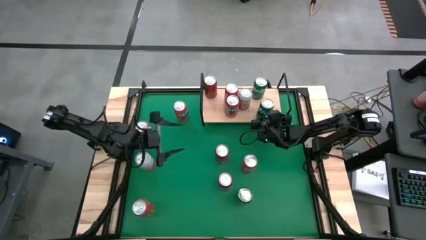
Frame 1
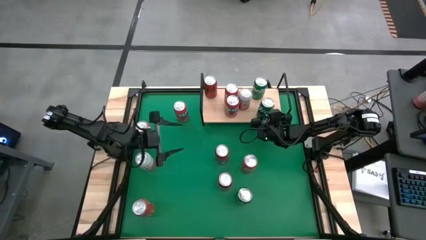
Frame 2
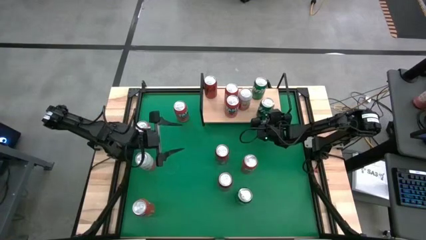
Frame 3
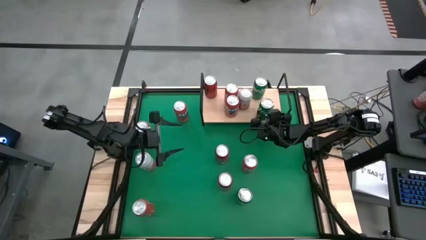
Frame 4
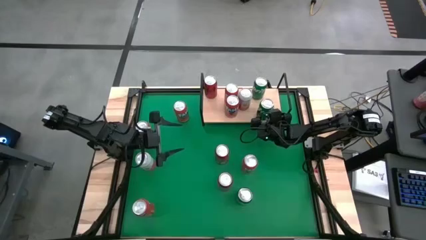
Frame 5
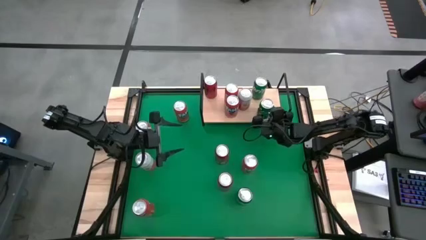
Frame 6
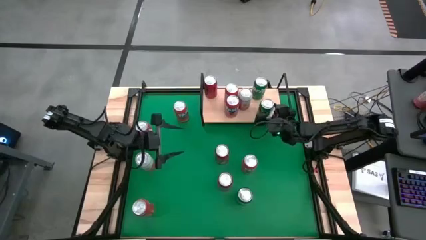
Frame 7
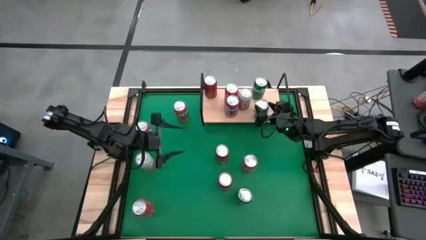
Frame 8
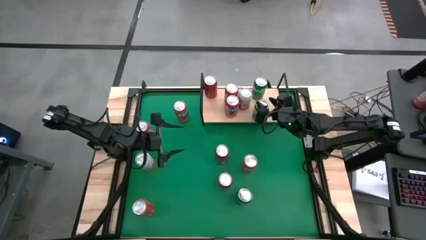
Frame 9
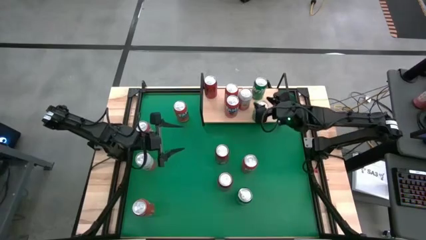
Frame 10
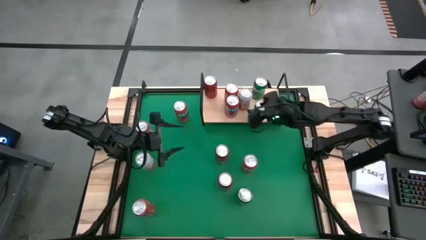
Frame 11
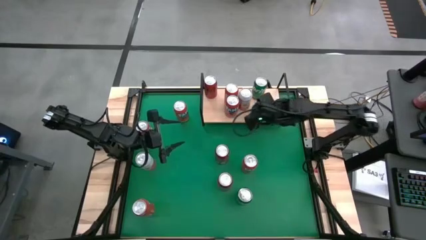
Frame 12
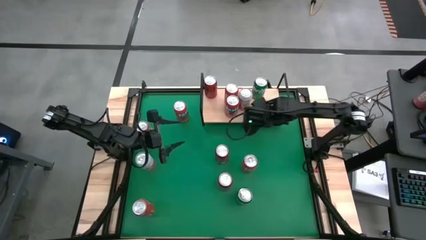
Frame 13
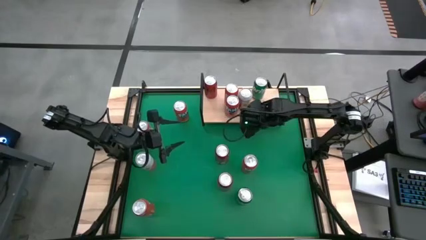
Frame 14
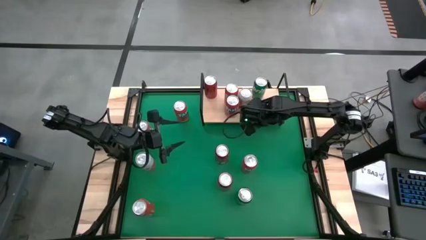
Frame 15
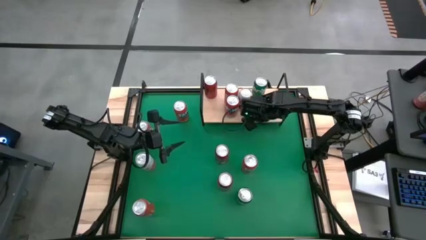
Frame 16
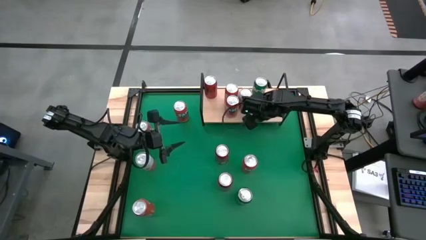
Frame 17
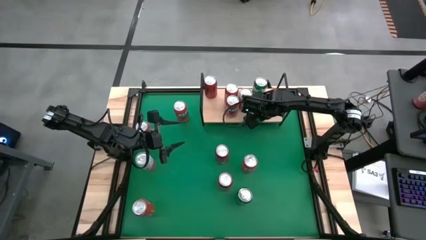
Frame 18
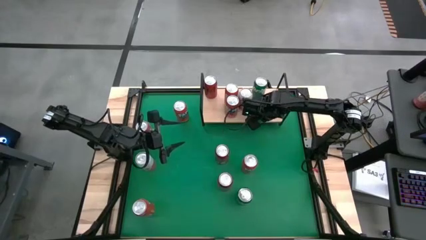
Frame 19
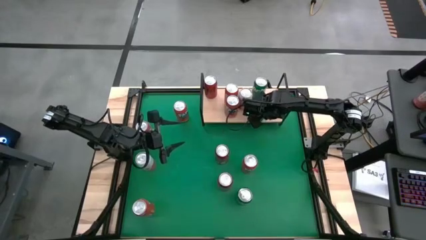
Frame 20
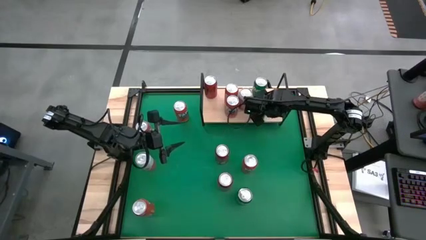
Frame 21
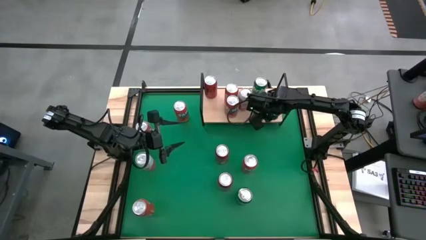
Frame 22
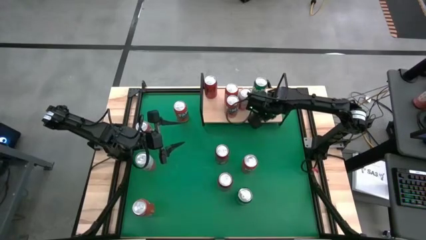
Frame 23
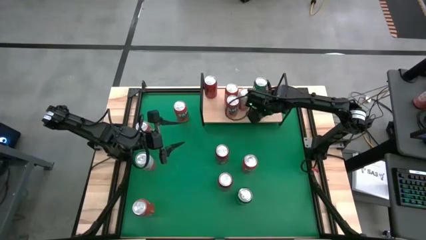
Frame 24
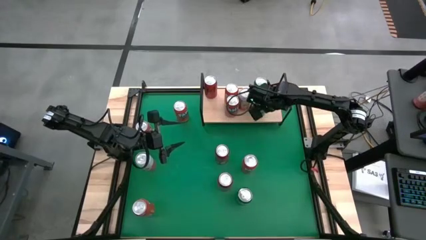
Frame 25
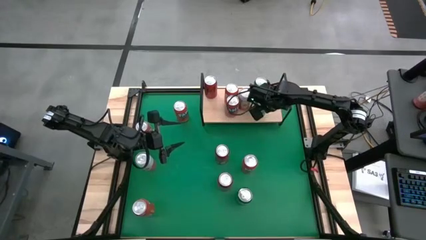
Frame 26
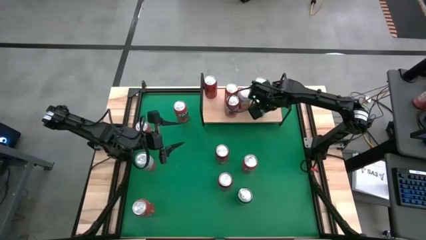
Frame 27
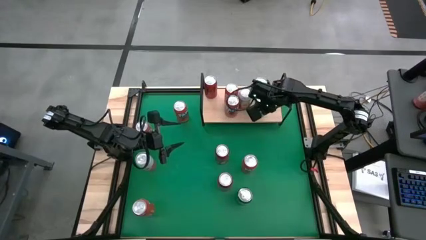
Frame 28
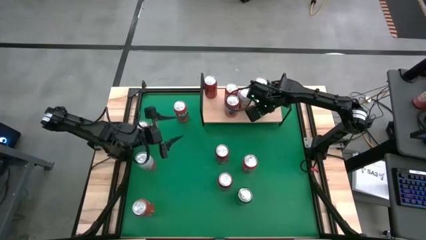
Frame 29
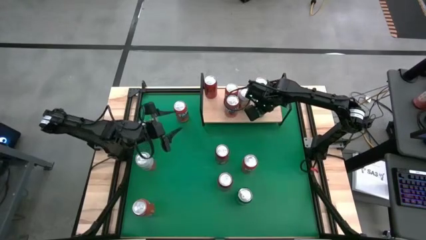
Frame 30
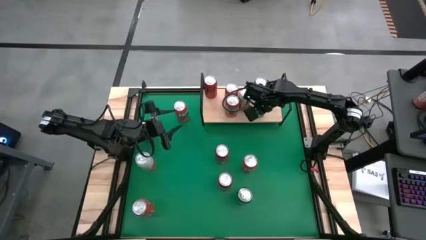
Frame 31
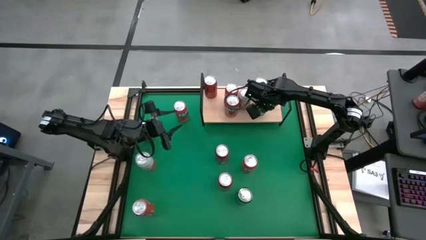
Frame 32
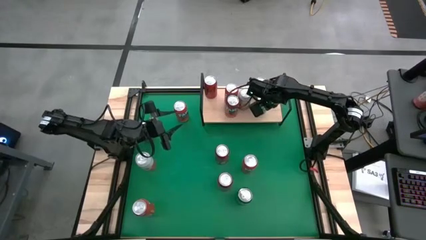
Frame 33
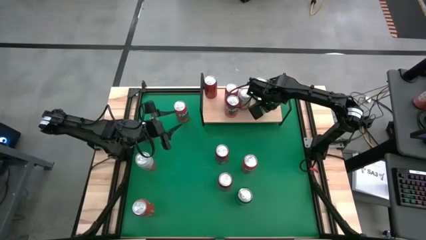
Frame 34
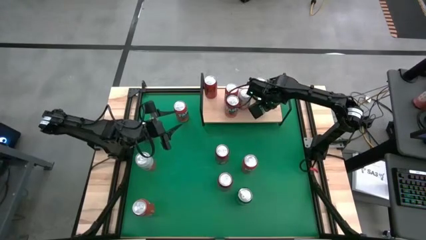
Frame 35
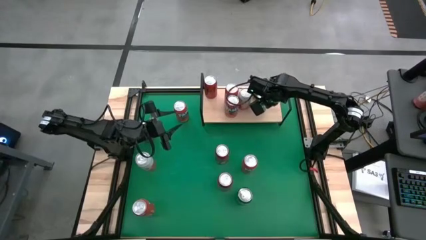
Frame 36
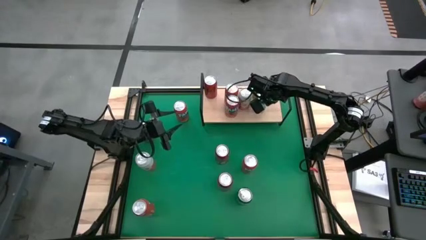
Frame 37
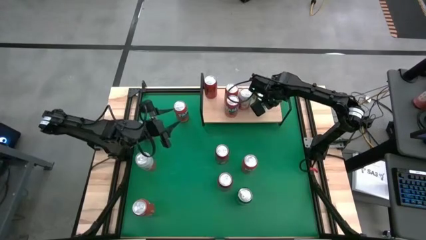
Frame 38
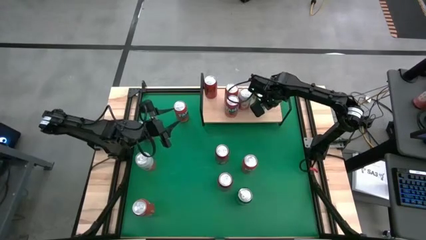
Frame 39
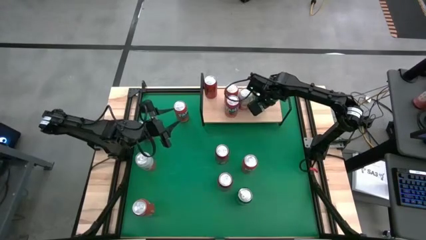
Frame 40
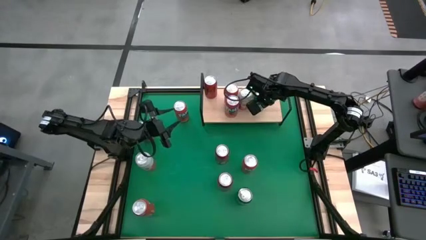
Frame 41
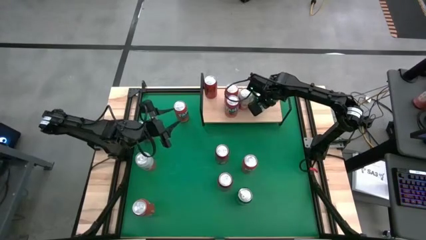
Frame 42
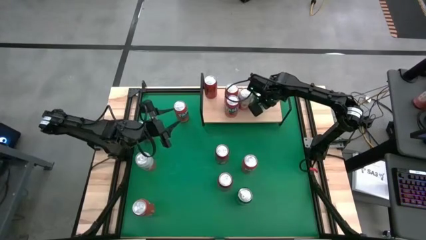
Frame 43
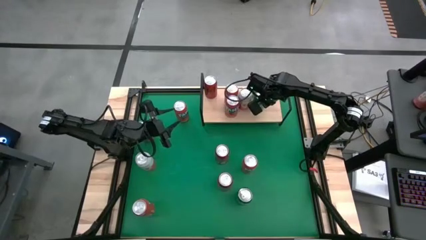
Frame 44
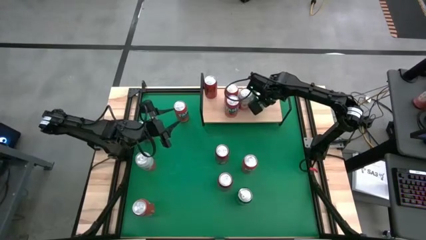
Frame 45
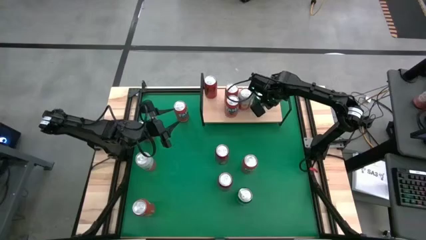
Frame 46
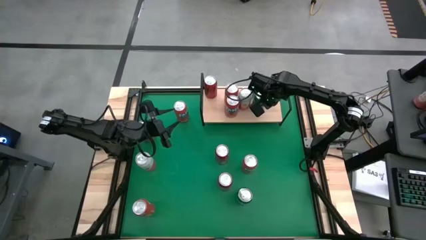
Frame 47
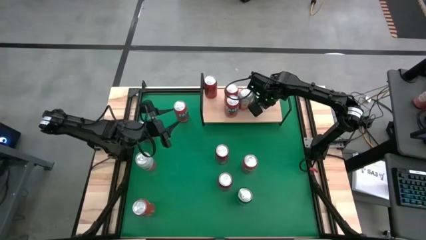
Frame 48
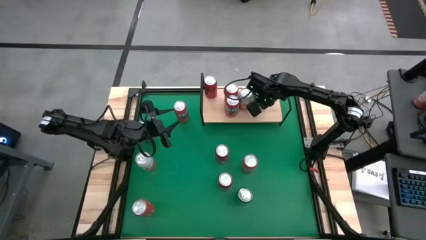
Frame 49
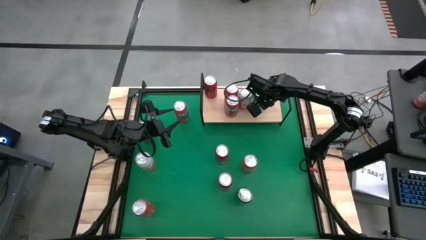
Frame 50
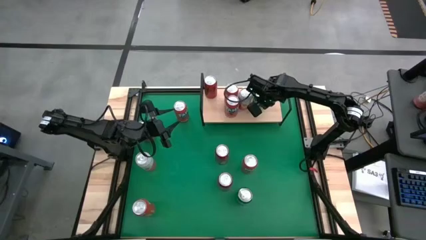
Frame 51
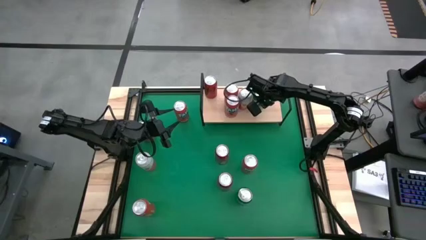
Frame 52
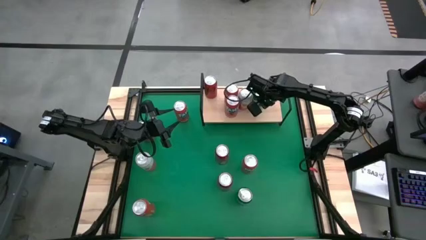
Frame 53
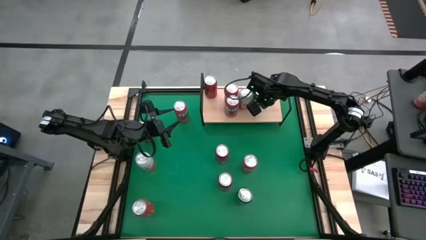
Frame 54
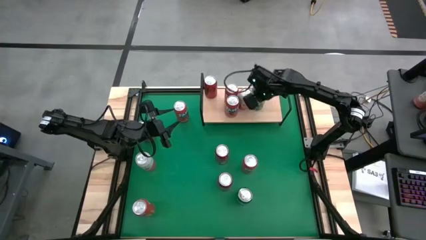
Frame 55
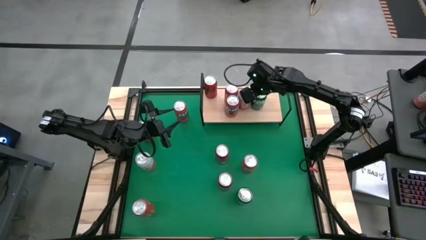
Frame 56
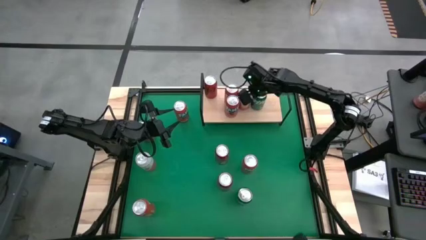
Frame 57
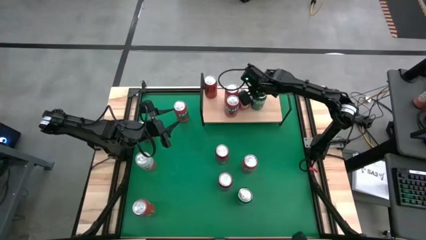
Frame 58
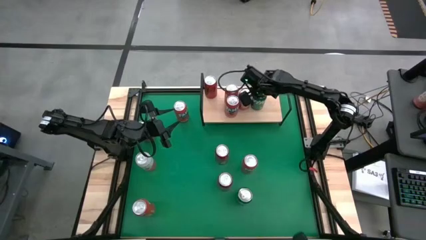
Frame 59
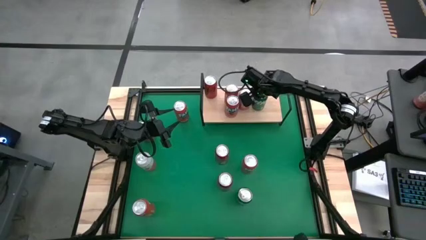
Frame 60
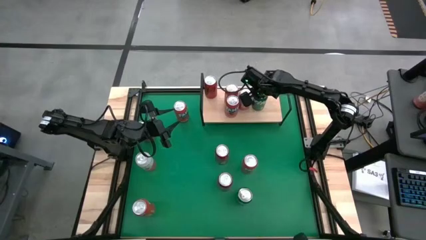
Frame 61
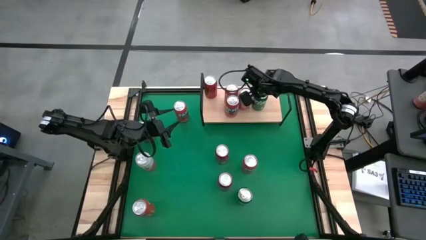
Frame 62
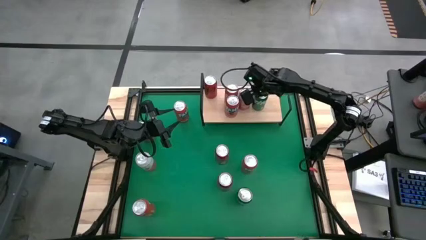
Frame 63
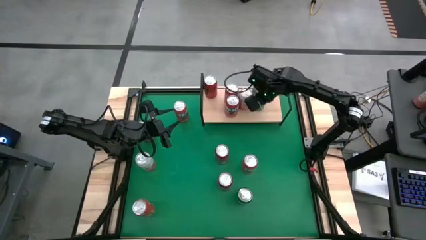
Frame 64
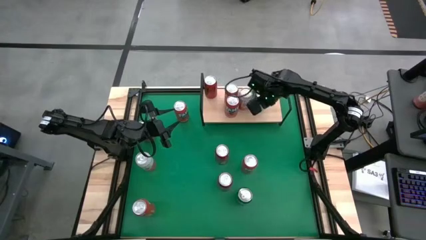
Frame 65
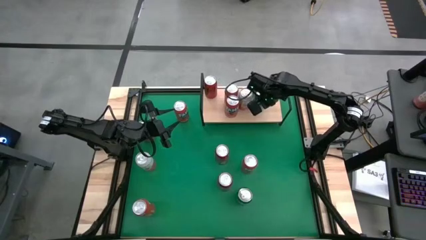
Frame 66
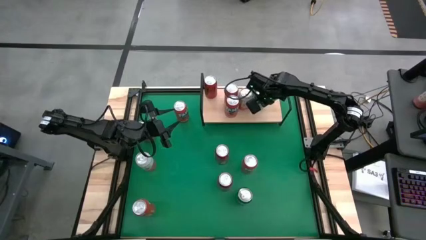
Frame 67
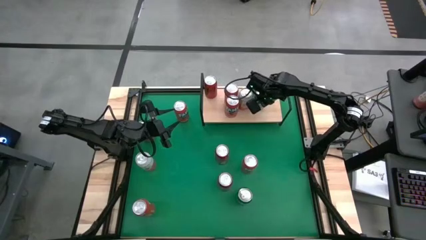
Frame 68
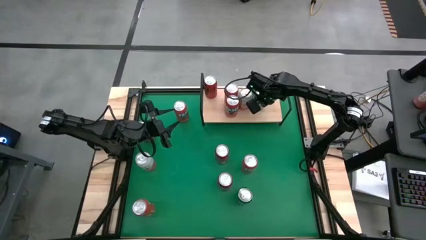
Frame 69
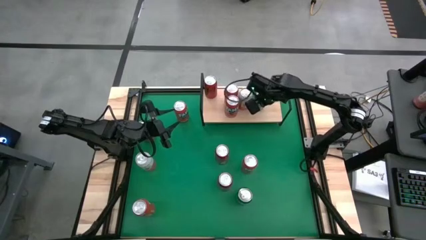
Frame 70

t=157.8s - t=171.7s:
Task: Place canned beverage on shelf
Put the green soda can on the shelf aligned with the other green soda can
